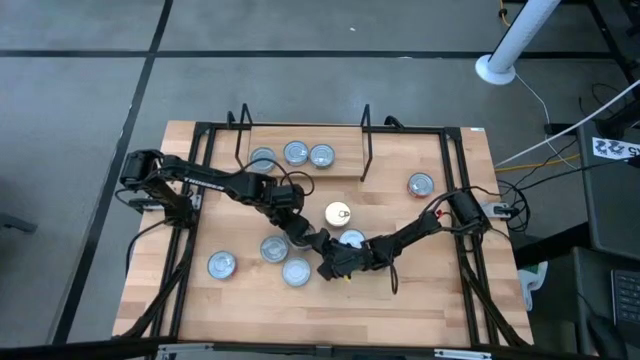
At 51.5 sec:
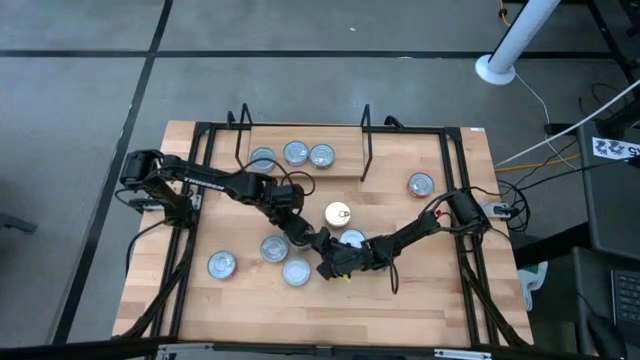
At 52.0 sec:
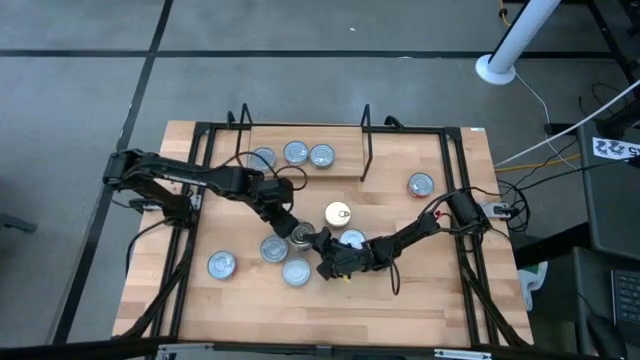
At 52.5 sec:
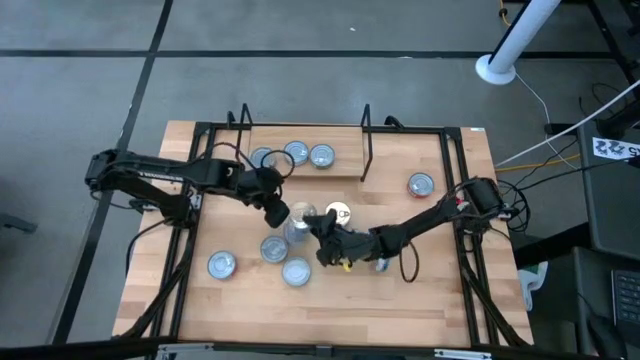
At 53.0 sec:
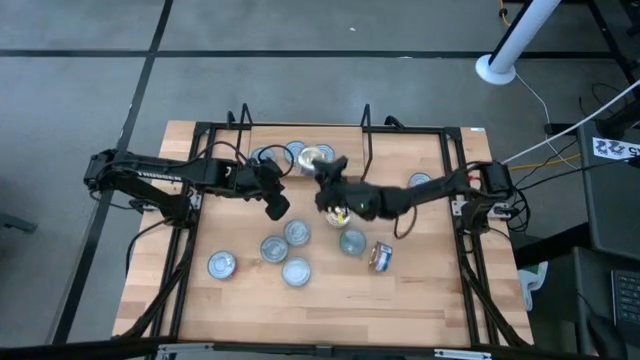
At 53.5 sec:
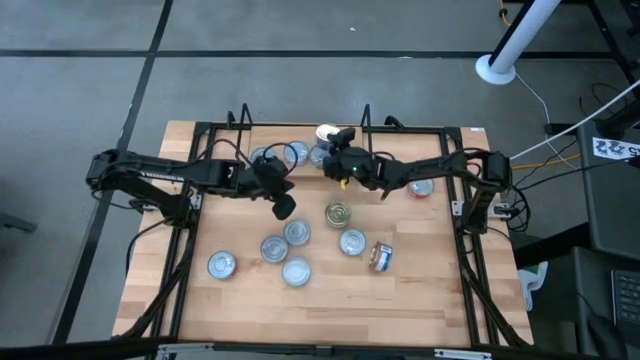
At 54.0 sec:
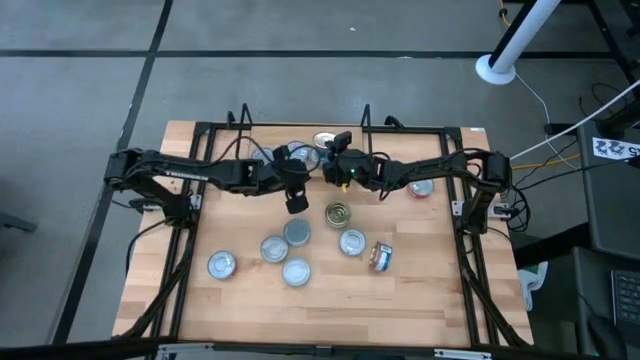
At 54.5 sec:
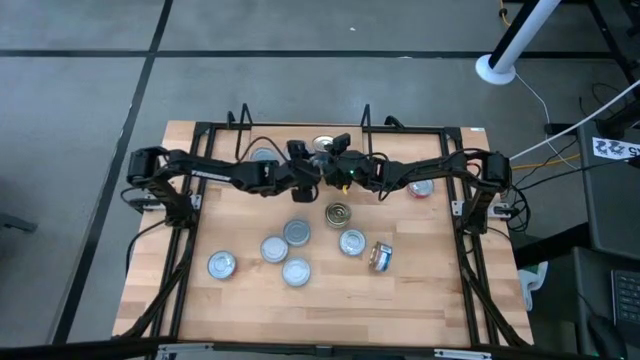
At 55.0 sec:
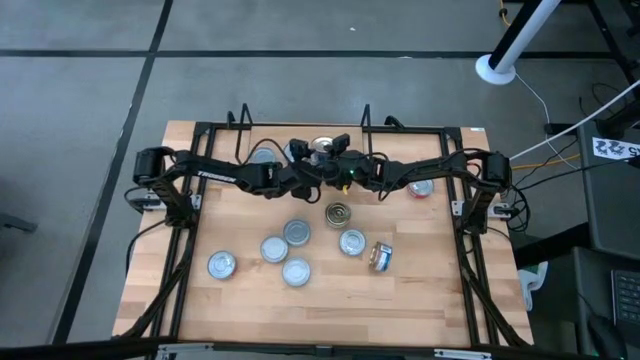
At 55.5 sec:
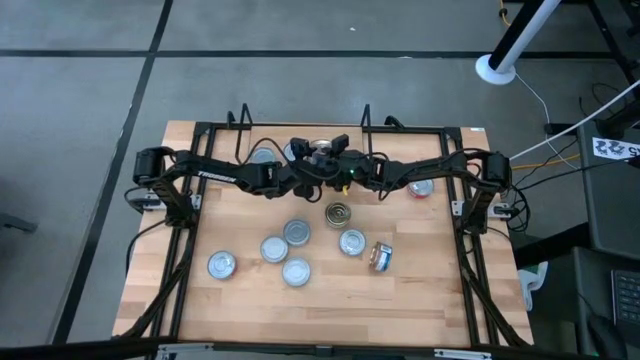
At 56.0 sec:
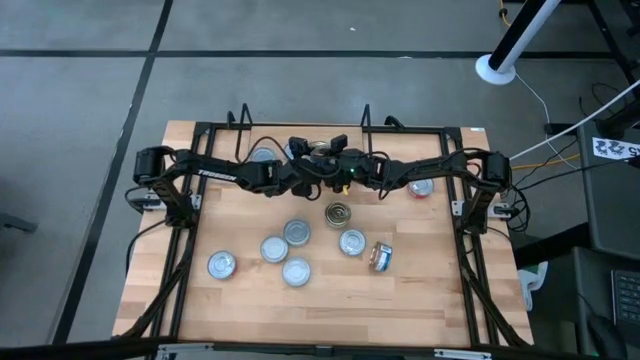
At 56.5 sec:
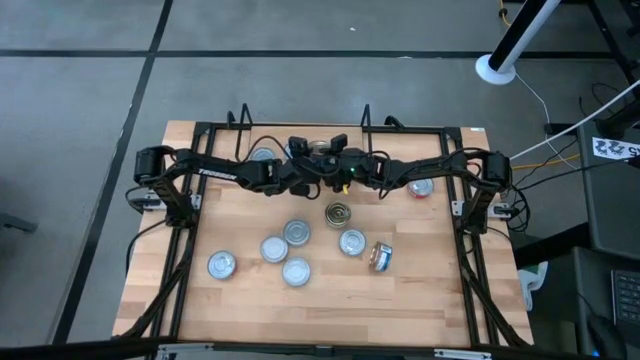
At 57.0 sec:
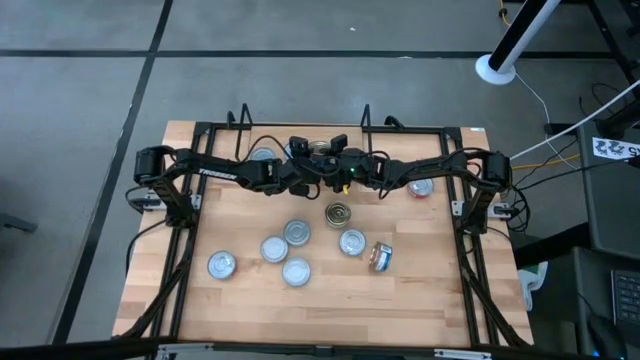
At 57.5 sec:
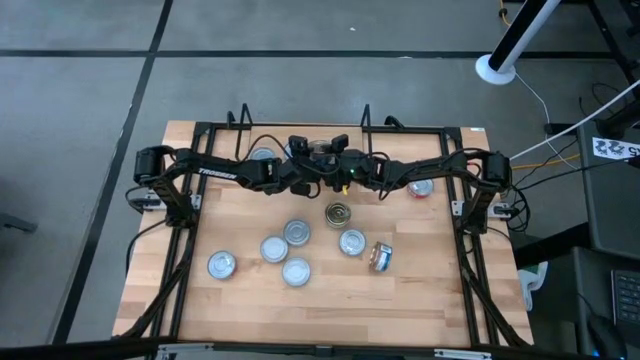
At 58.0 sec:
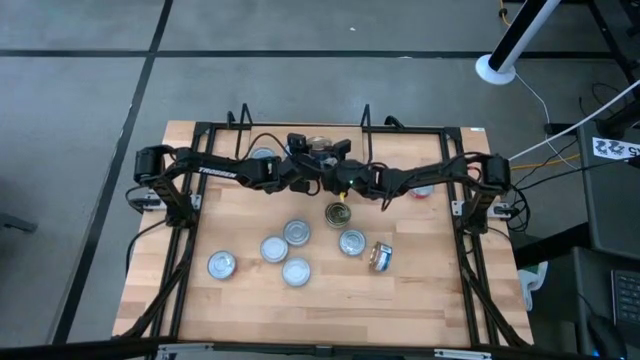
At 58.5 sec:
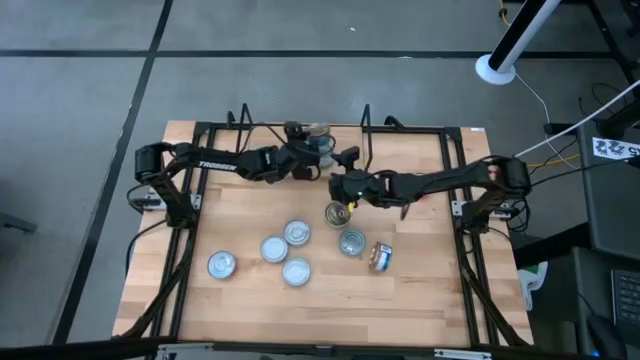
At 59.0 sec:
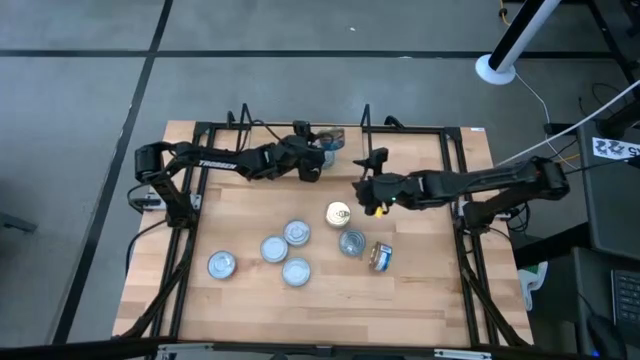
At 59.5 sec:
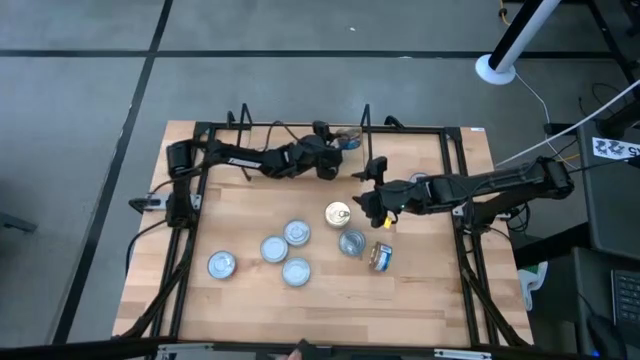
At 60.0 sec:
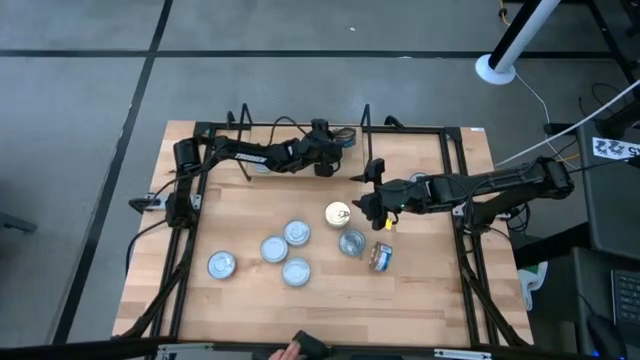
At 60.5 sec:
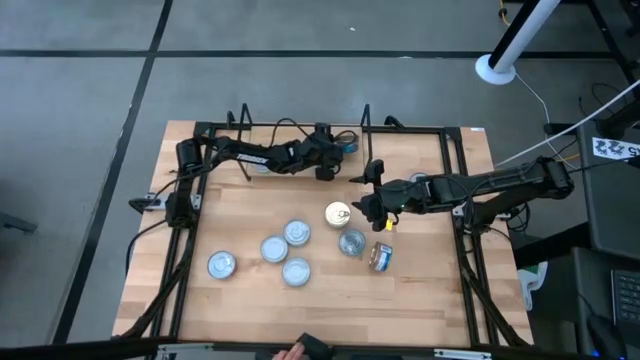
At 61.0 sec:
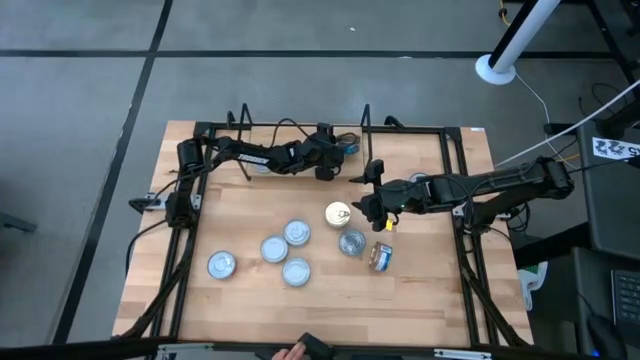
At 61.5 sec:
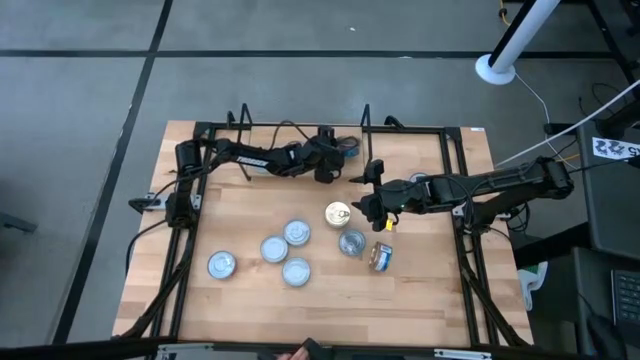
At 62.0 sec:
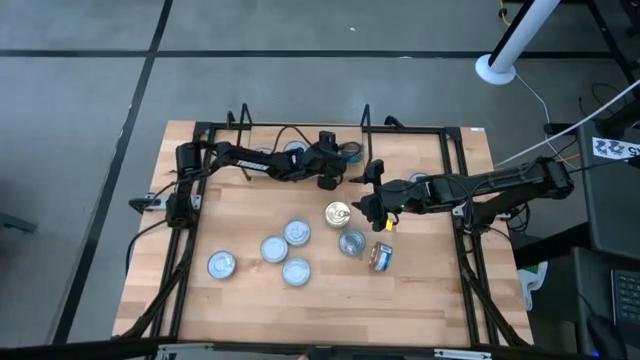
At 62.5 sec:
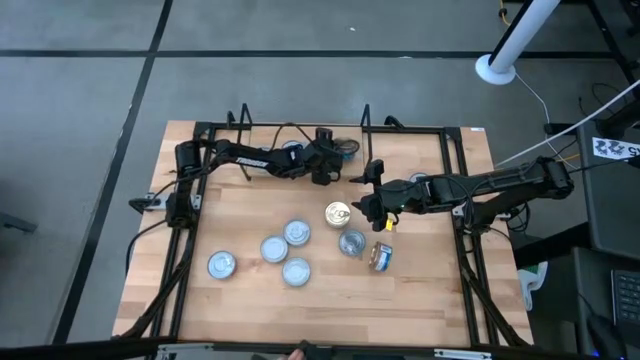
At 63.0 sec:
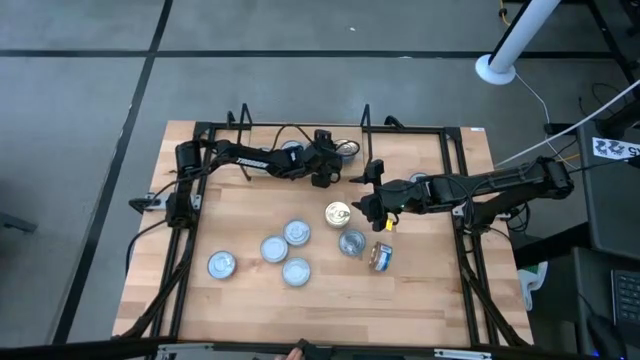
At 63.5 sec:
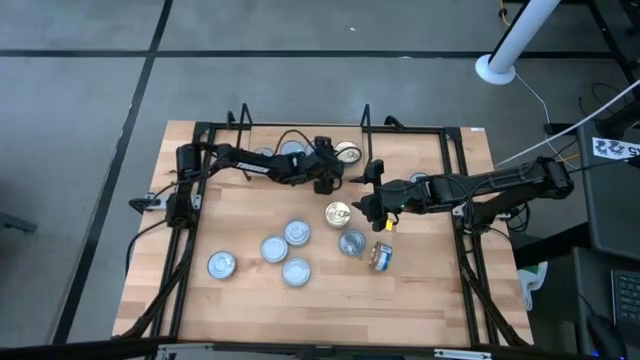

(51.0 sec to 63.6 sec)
Task: Stack canned seafood by type on shelf
Put the blue-pink tuna can on the shelf

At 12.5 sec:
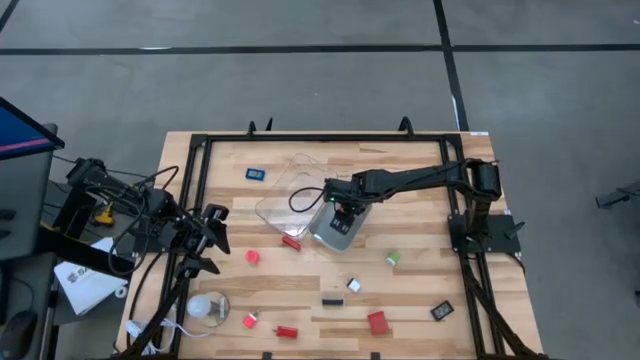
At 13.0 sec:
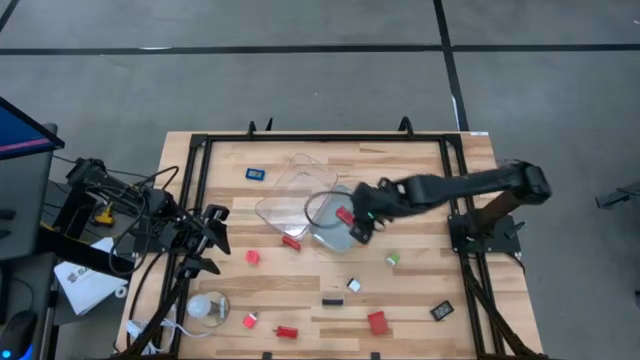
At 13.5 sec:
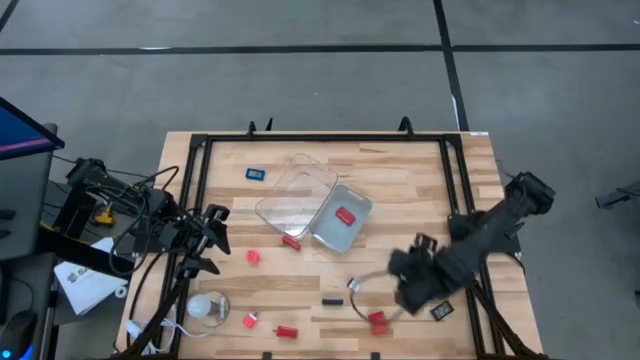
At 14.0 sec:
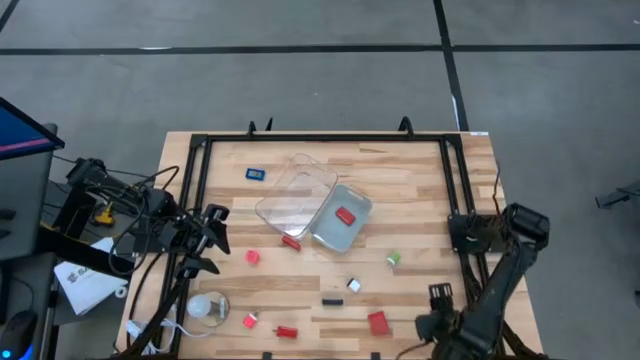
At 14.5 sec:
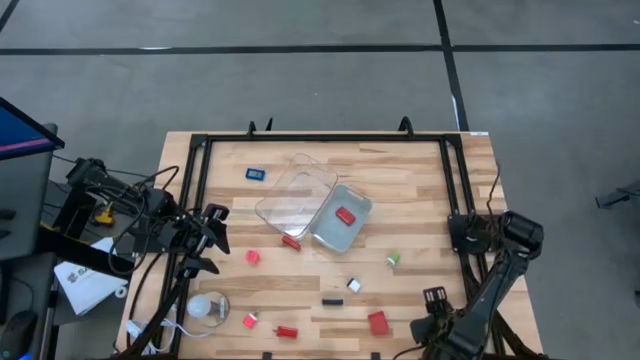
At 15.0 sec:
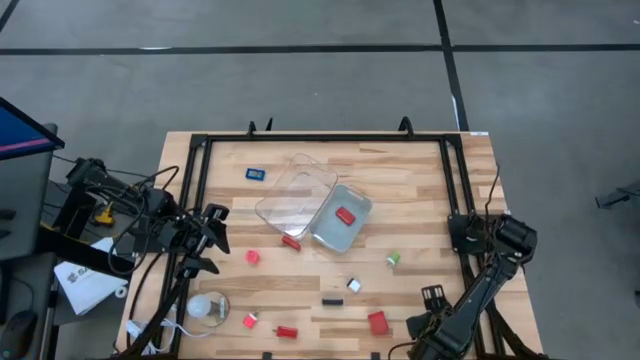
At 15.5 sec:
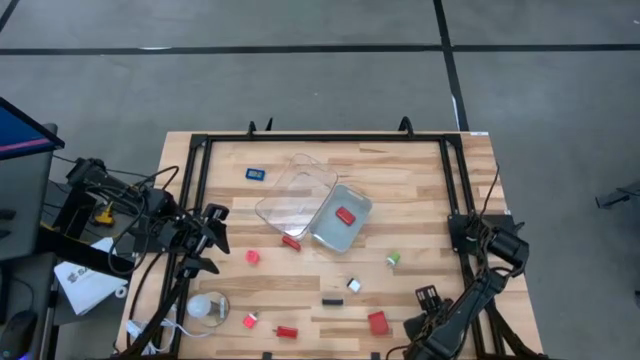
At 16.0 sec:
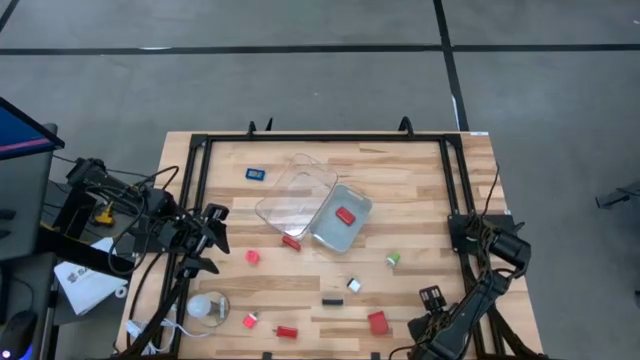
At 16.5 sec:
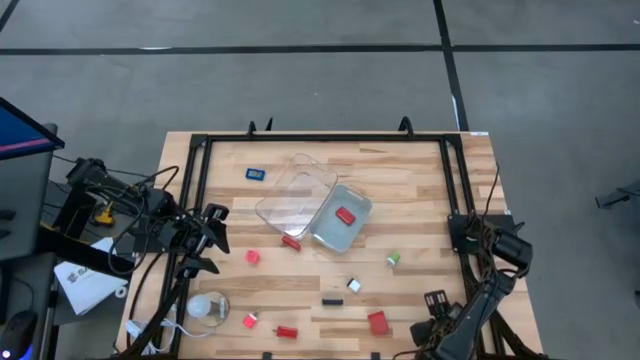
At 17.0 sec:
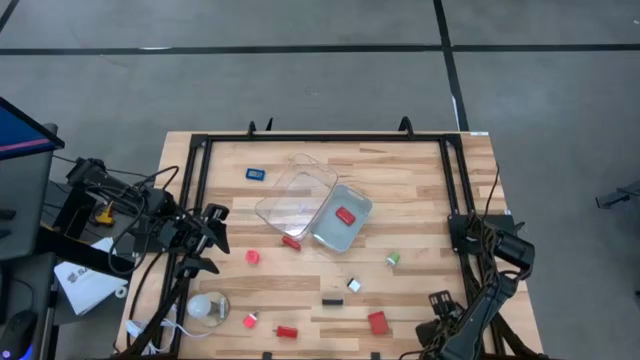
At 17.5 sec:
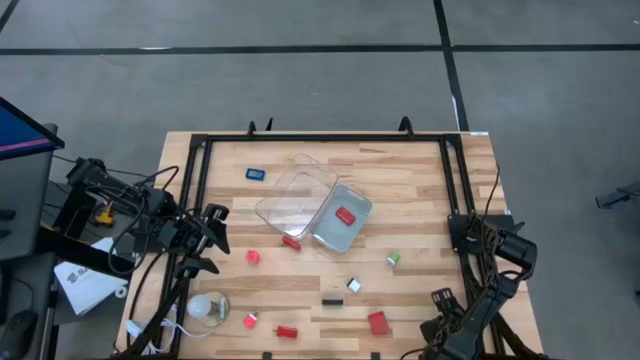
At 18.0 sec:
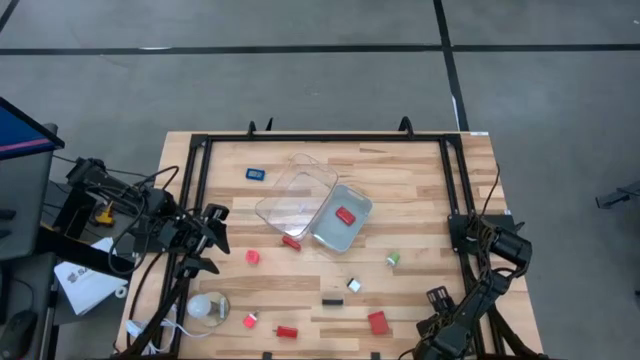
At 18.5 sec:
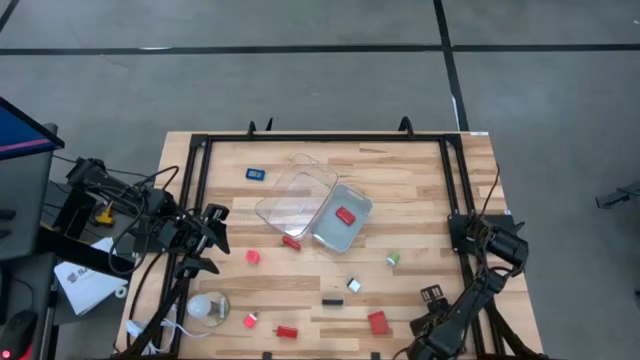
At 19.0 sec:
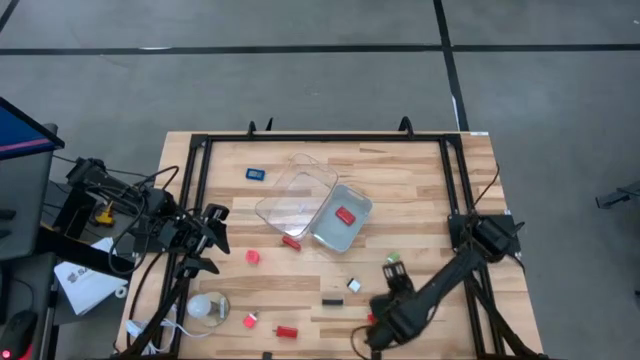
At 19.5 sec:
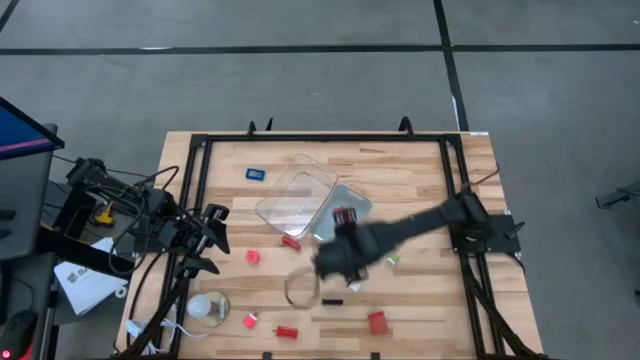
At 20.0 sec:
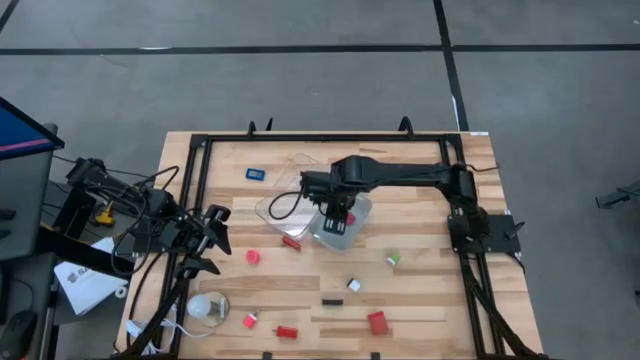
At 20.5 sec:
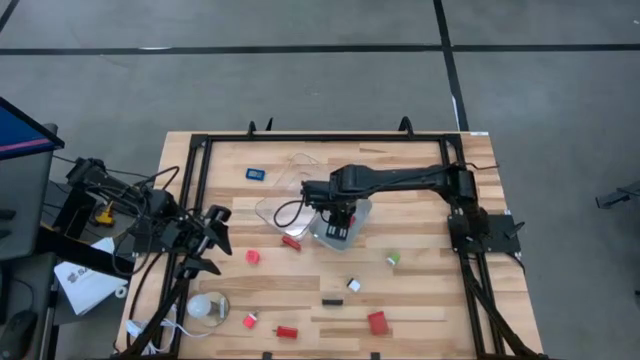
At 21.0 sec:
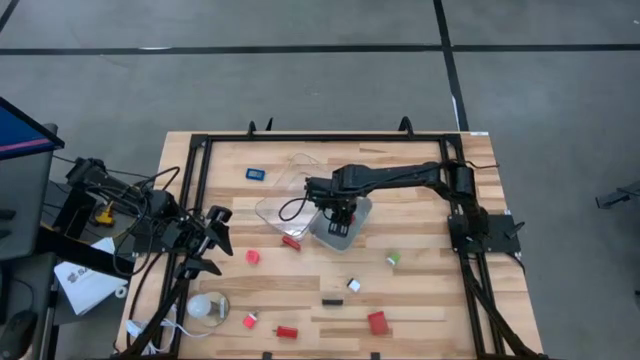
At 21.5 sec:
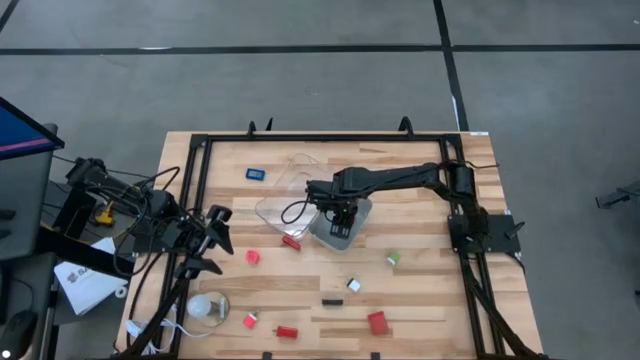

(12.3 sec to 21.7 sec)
Task: Pick & Place Office items
Put the bottom black digital timer into the gray bin
